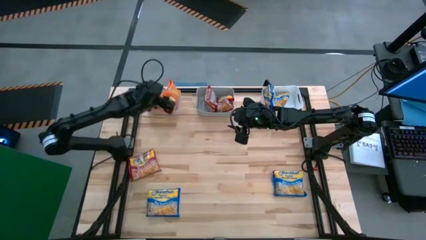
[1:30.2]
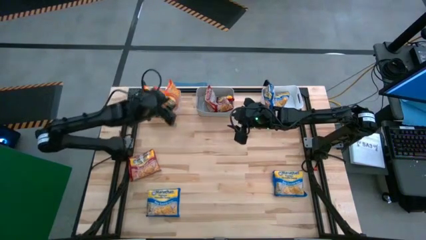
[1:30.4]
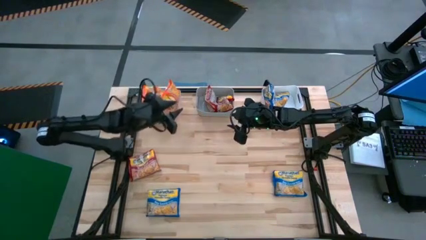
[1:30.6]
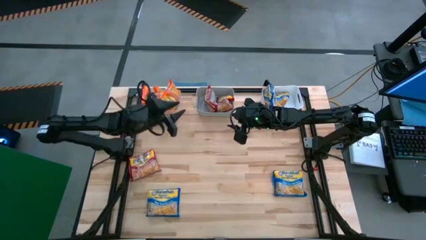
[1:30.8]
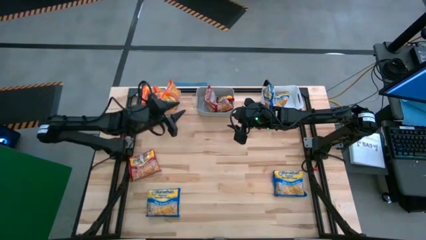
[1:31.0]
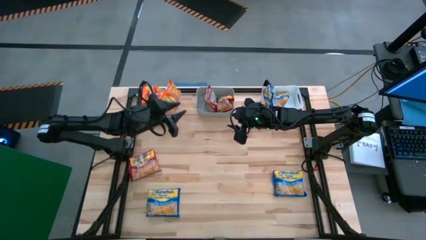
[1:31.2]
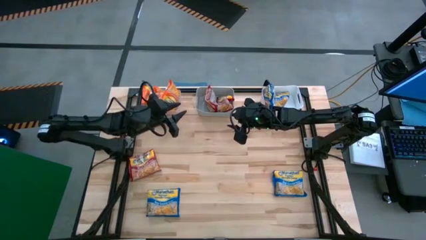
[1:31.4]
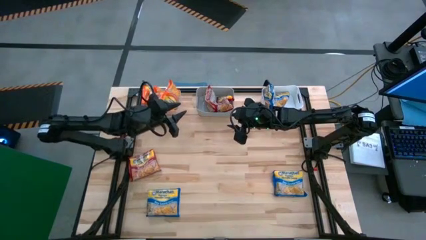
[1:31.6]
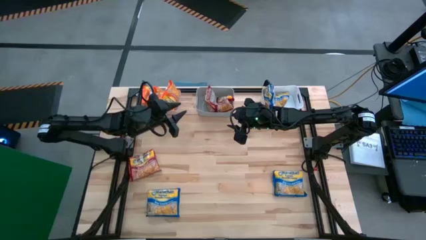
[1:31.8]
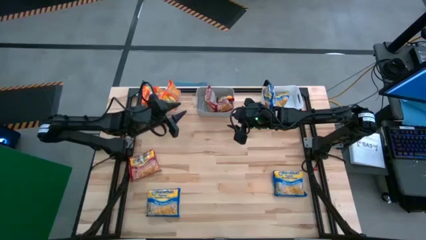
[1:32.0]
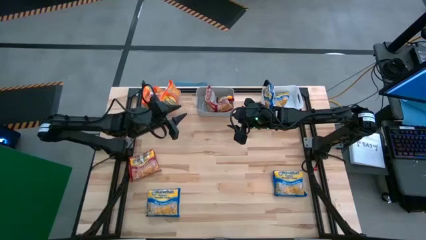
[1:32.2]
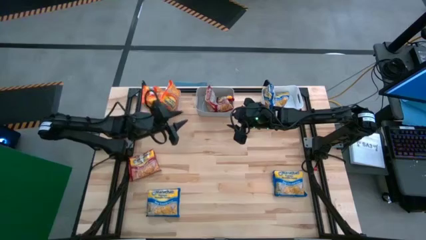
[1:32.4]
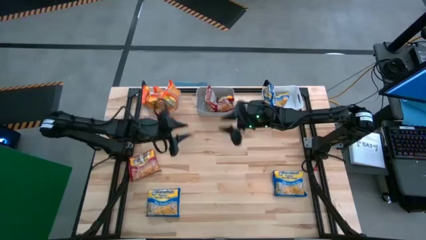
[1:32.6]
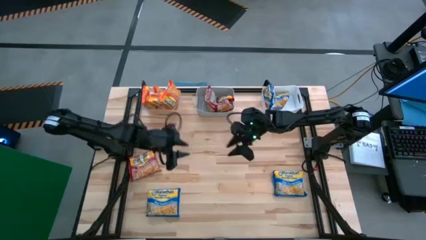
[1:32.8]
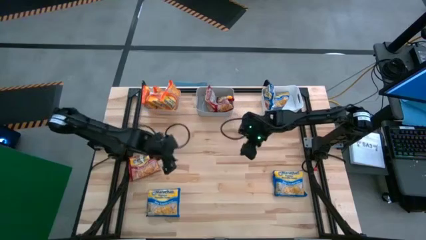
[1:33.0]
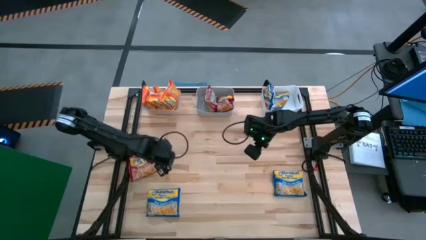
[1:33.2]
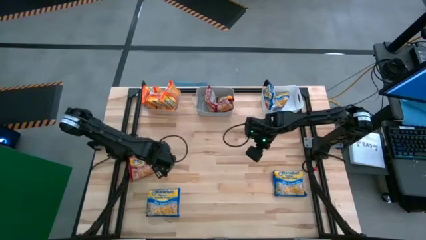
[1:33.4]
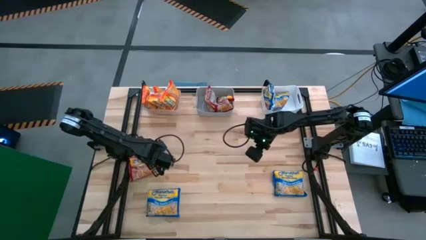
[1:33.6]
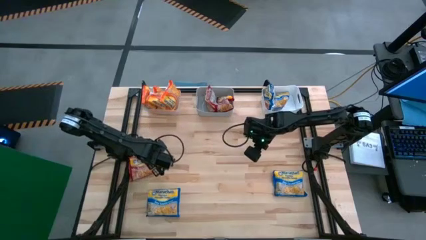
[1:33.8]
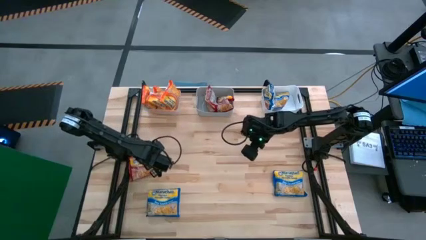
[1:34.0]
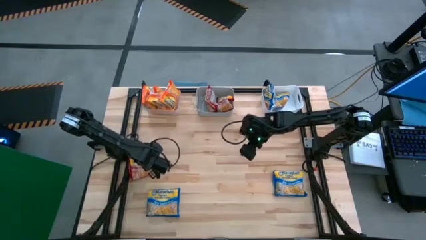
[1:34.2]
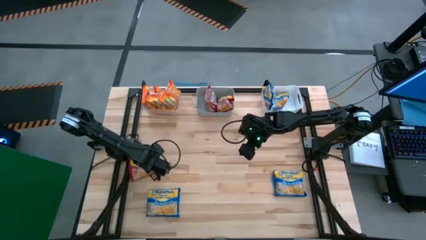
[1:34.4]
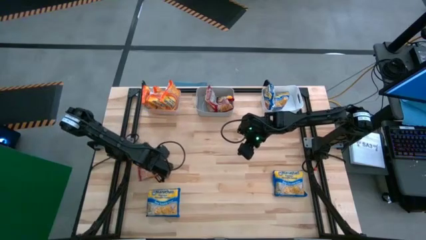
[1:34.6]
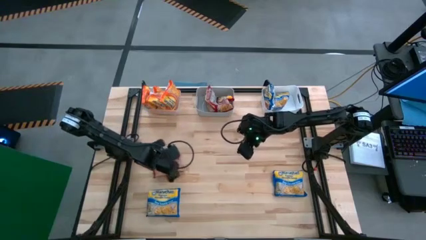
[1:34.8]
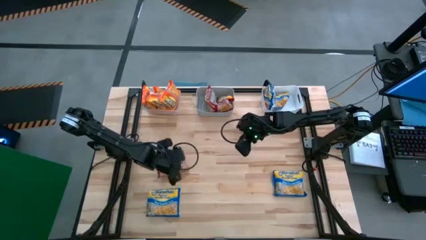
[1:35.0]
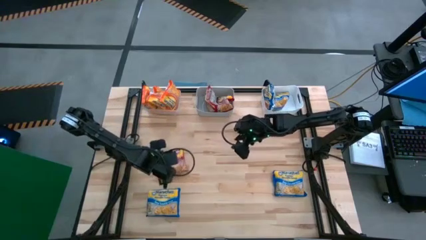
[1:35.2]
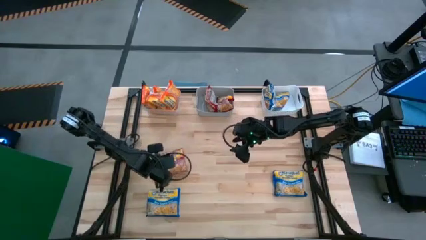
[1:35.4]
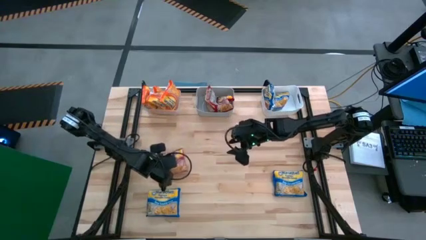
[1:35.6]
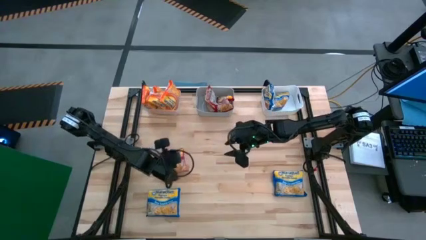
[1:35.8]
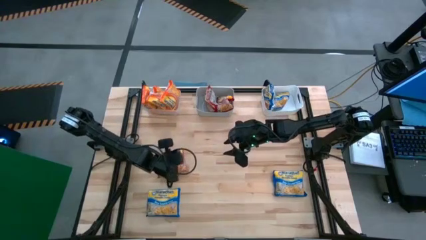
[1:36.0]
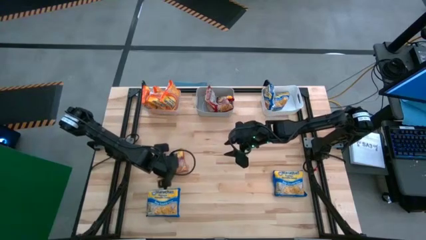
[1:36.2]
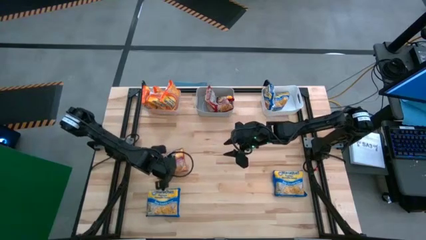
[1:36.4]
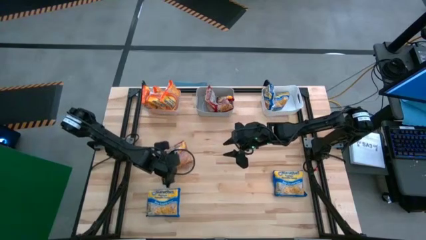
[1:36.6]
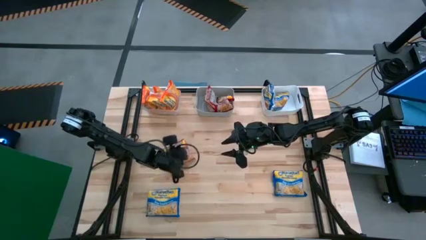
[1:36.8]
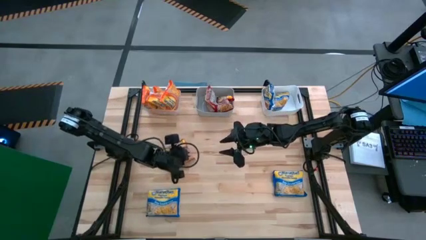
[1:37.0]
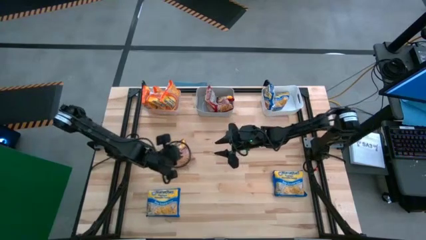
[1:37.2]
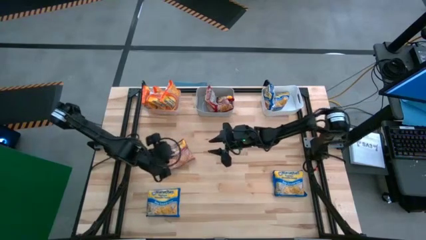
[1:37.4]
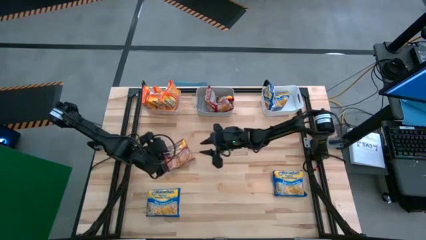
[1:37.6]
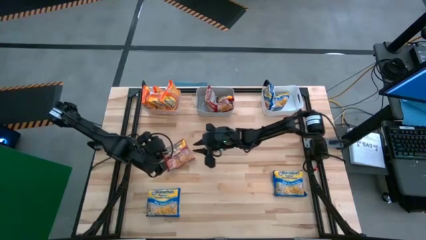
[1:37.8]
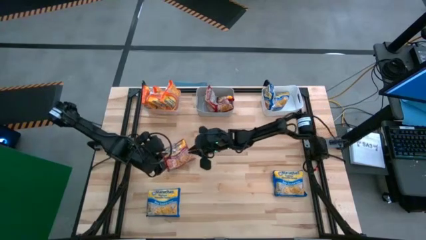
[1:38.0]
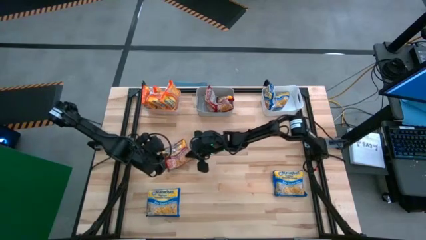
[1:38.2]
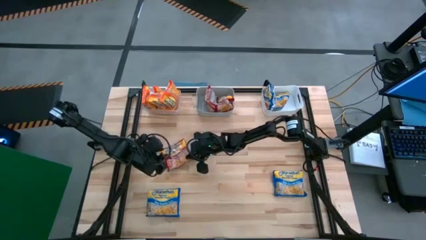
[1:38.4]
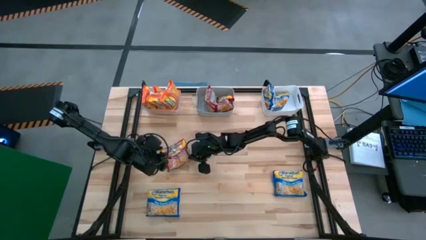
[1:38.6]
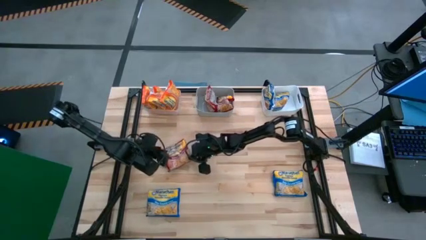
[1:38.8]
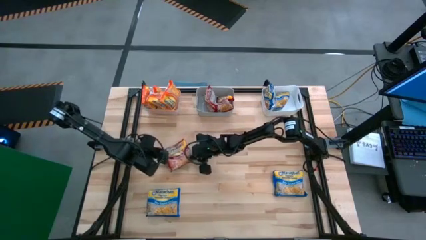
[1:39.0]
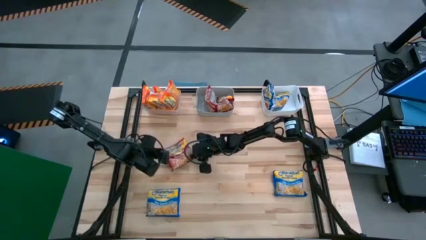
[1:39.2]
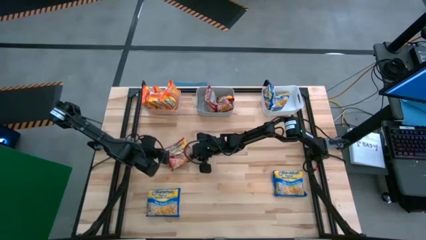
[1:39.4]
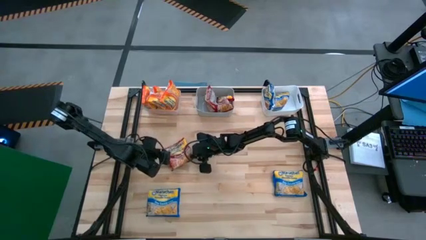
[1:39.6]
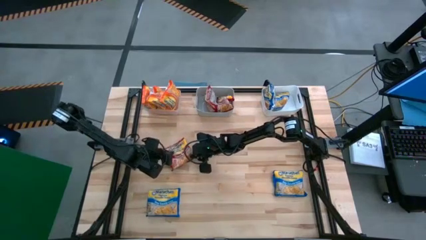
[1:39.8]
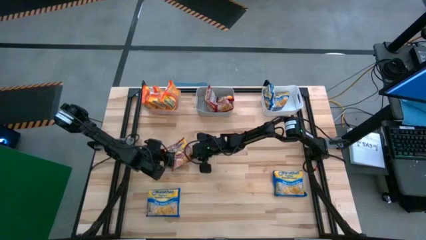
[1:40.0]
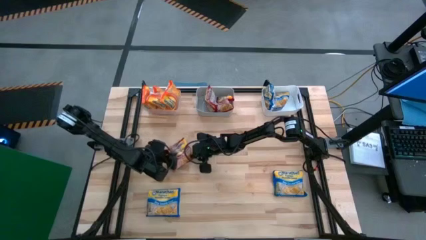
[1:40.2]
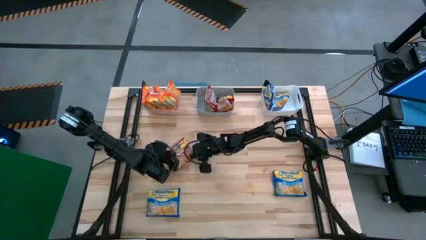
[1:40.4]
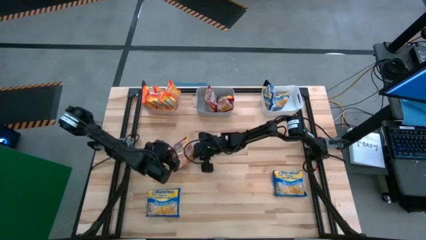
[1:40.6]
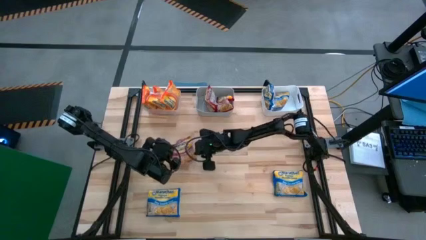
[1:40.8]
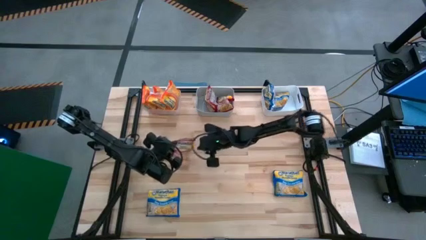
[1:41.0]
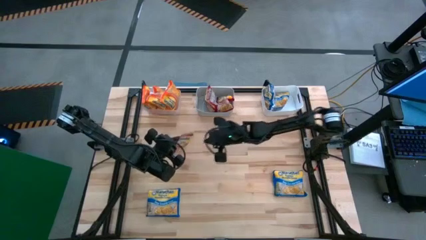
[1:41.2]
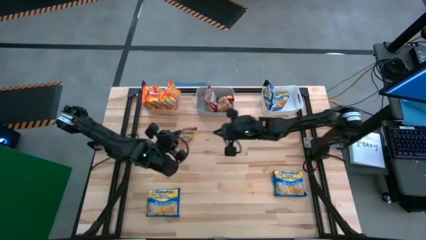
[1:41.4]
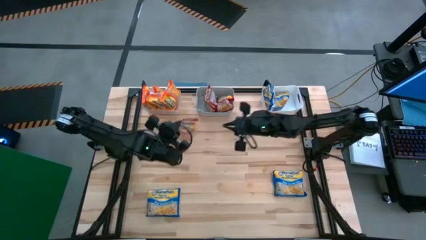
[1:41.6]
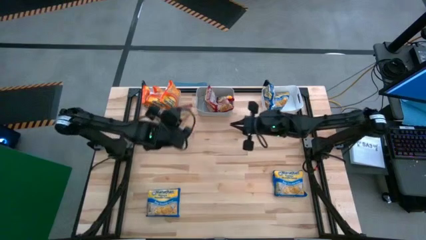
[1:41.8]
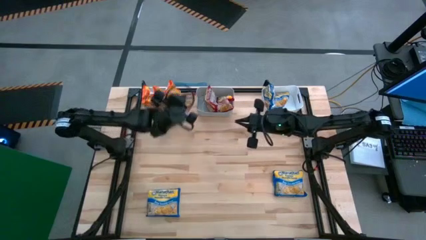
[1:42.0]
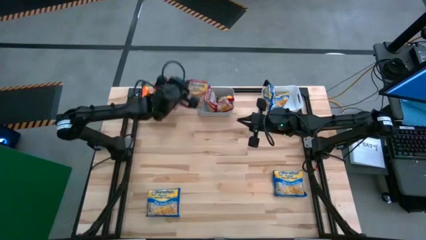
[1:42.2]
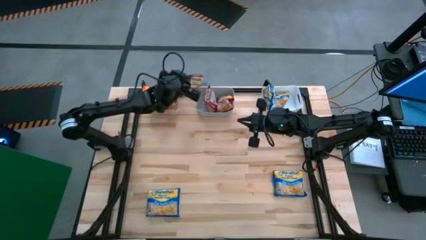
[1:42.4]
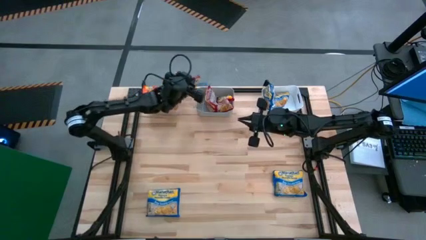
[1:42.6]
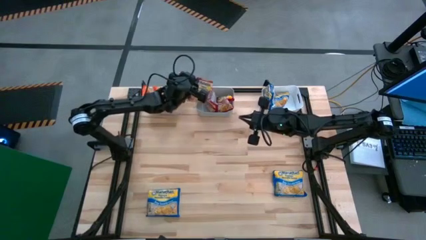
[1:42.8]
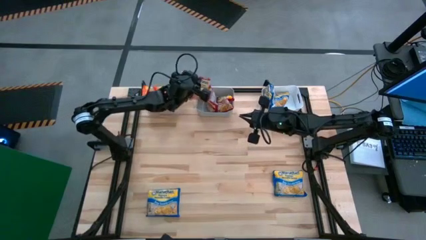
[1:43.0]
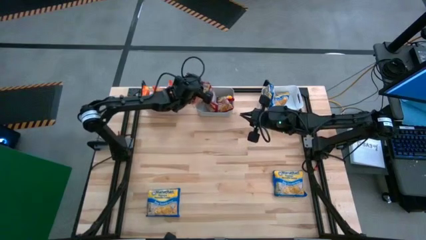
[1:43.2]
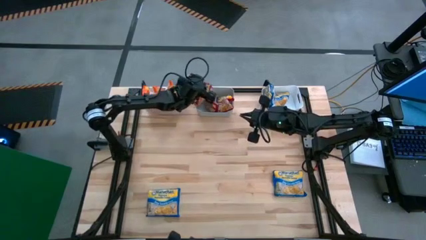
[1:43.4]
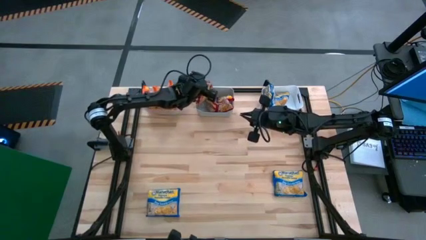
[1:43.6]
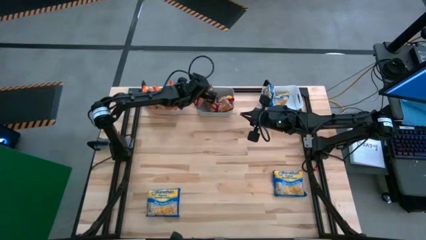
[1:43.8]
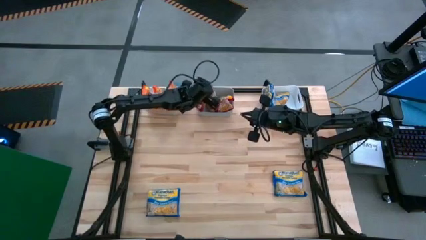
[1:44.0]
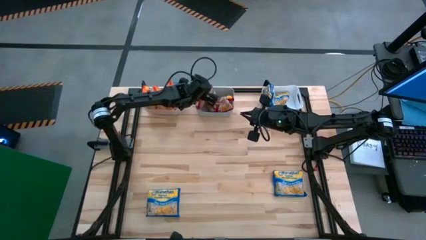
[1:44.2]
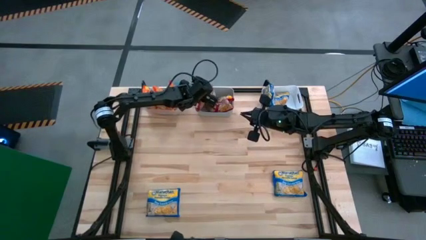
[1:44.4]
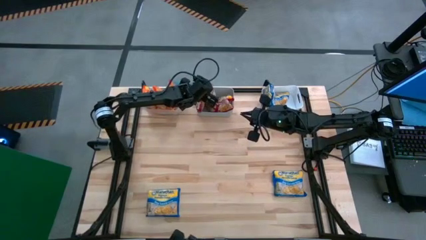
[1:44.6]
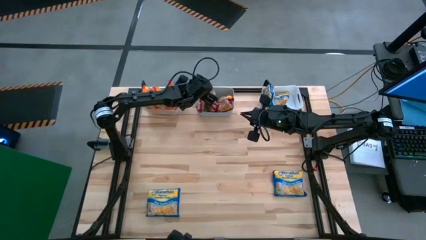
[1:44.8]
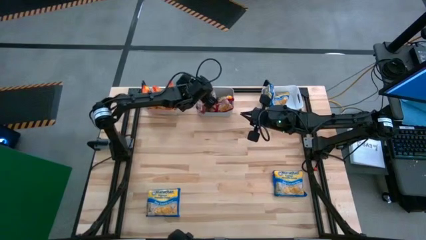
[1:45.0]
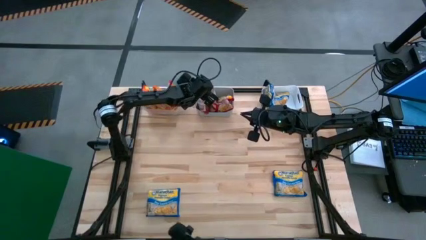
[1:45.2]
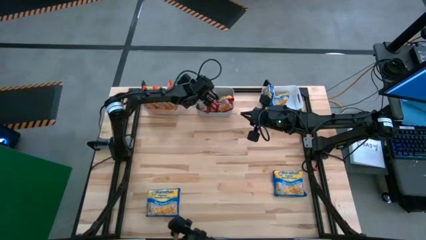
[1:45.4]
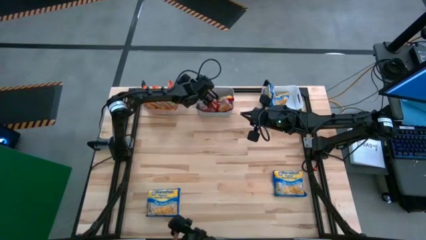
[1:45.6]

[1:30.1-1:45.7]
Task: Sort Maruchan noodles
Put the red noodle pack into the grey bin
